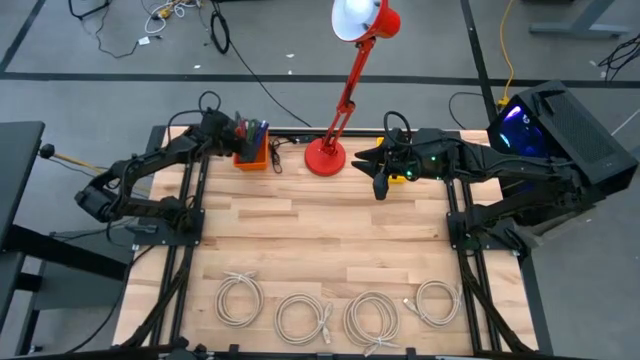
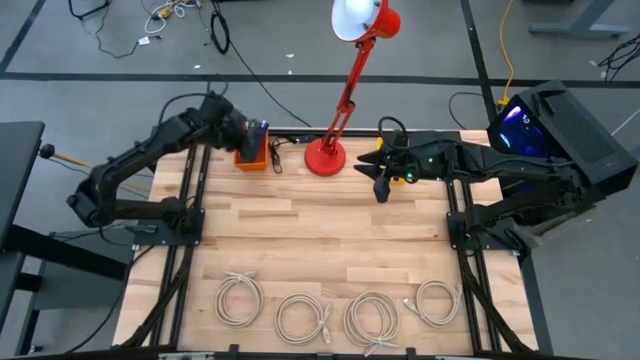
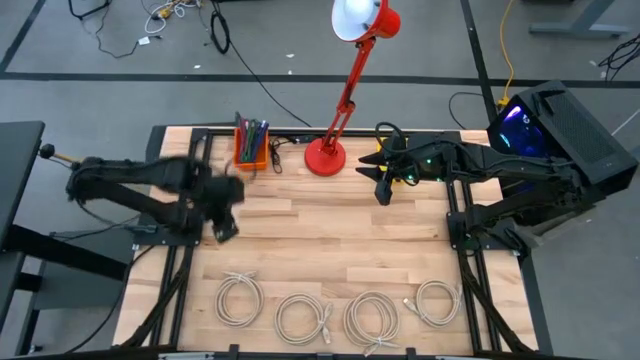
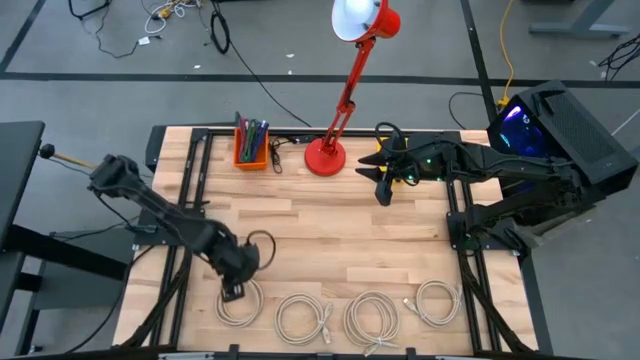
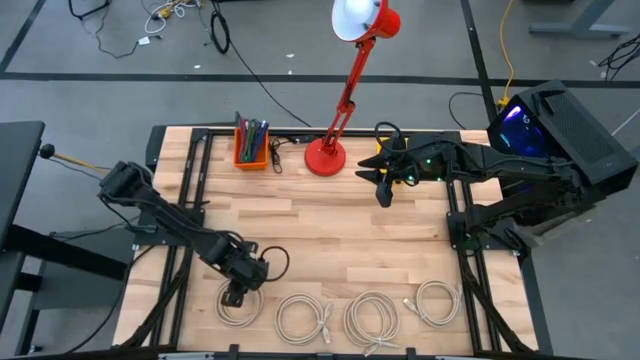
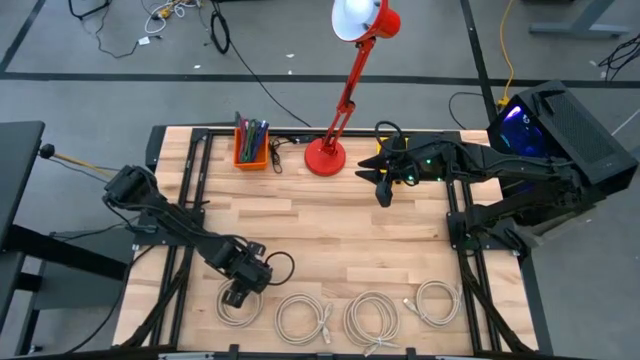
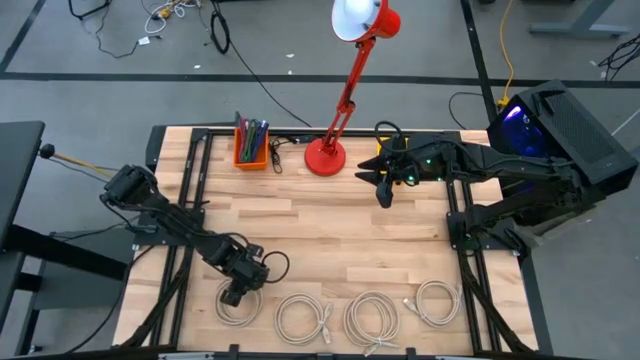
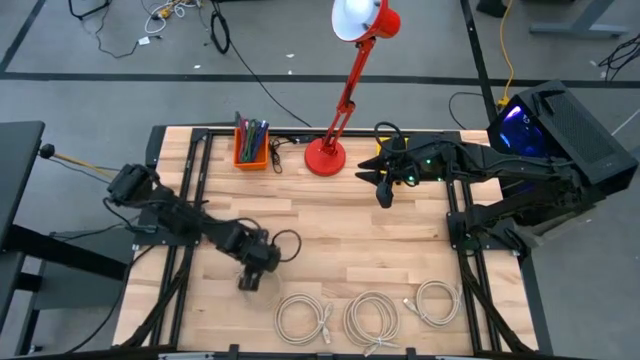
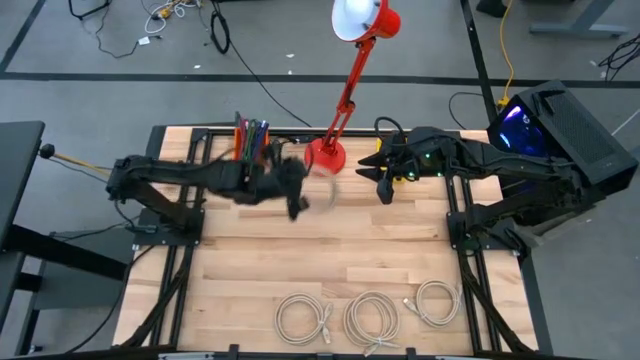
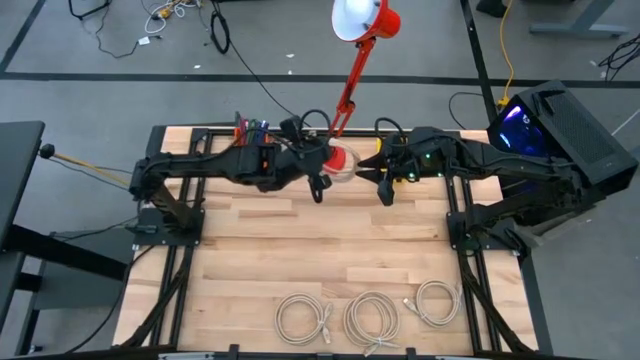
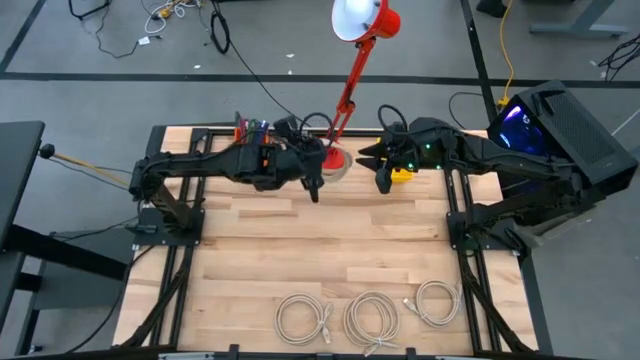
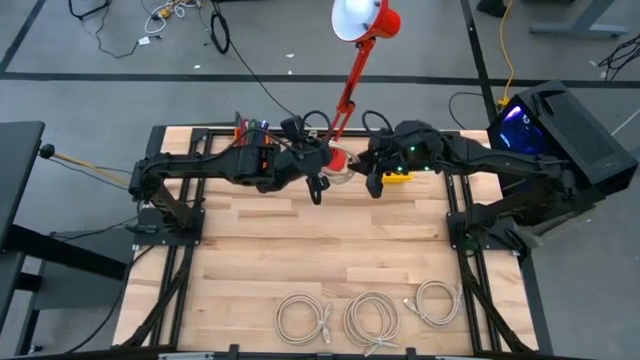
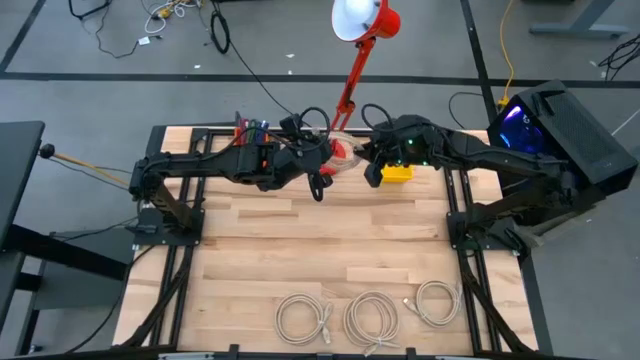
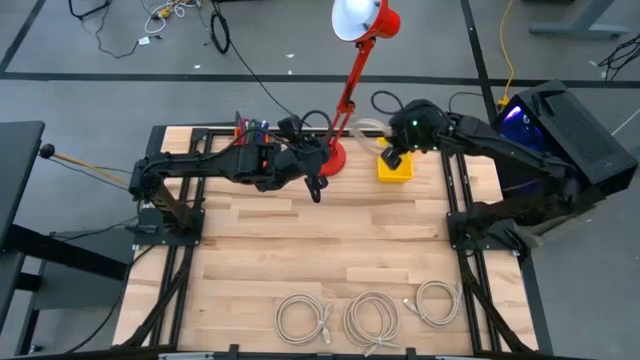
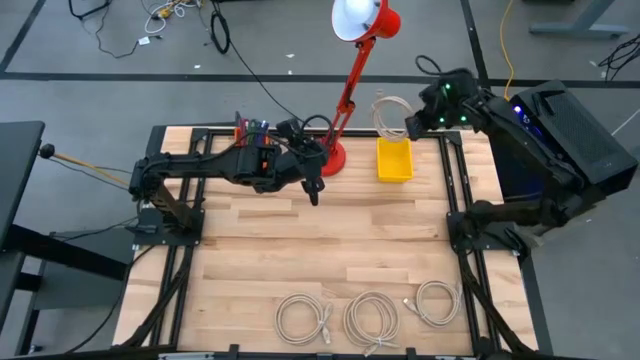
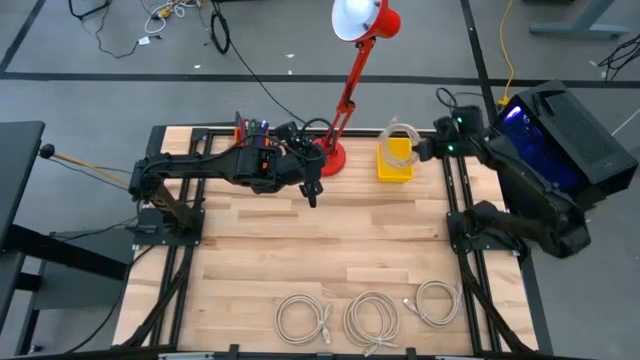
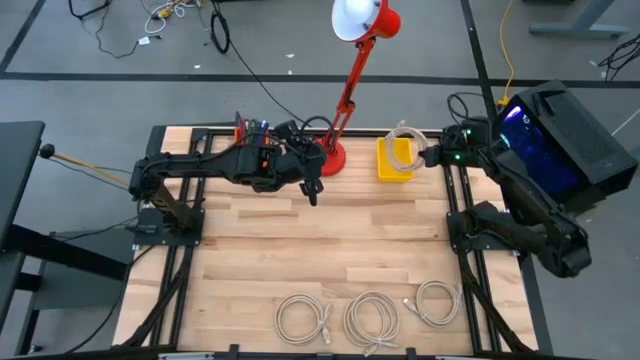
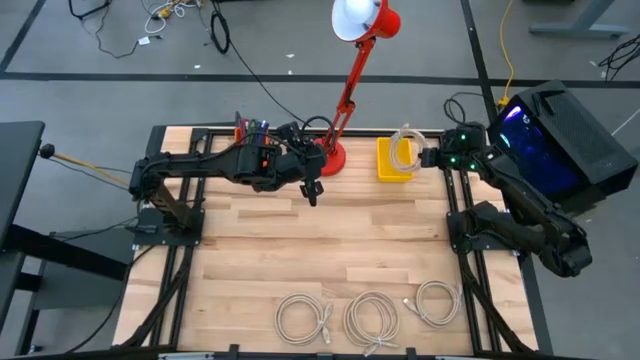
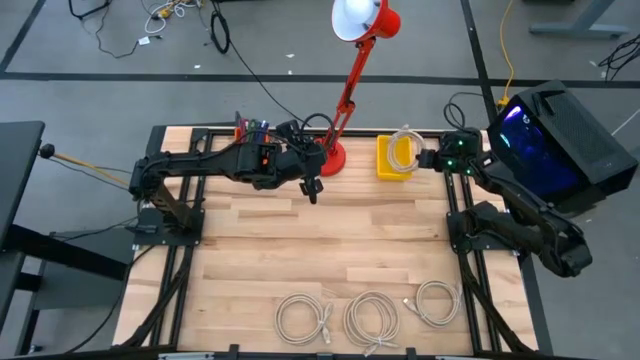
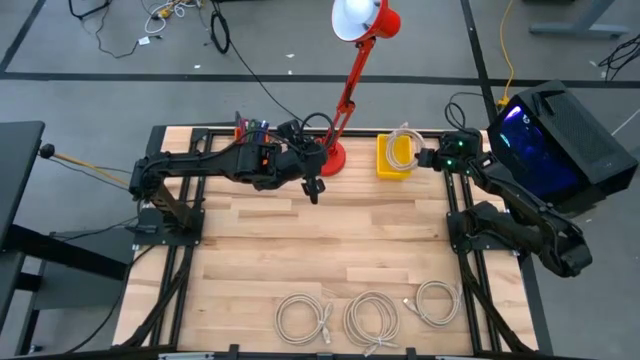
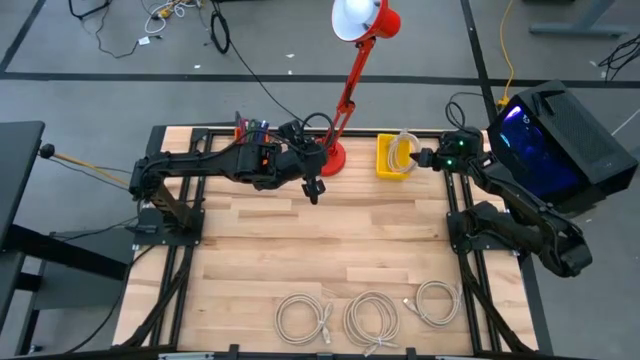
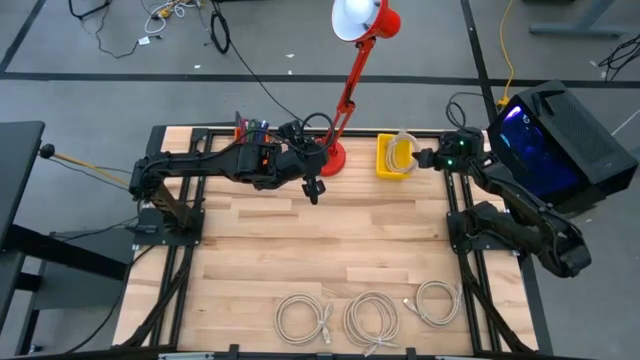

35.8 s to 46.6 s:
Task: Pick & Place USB Port
Put the white HDMI cable into the yellow bin

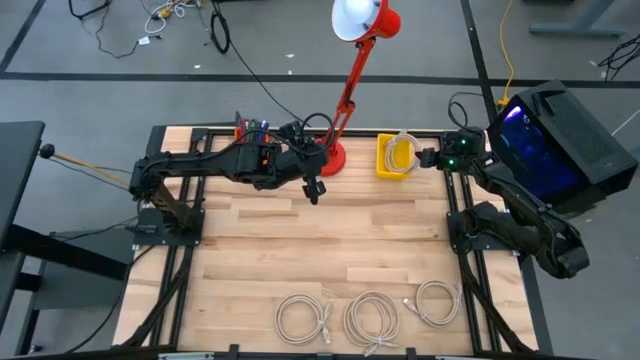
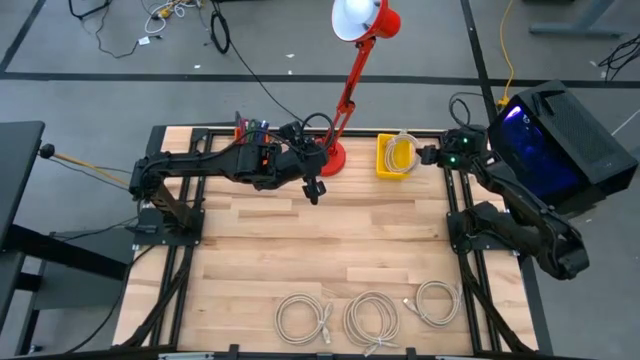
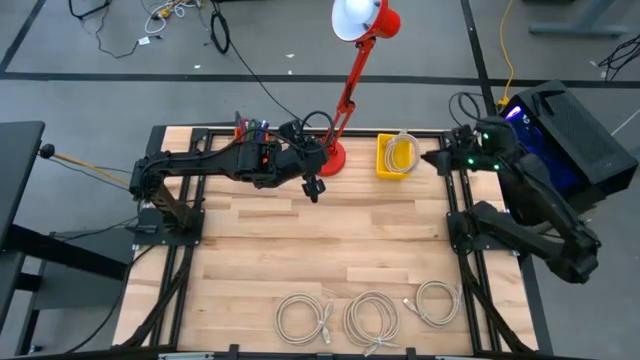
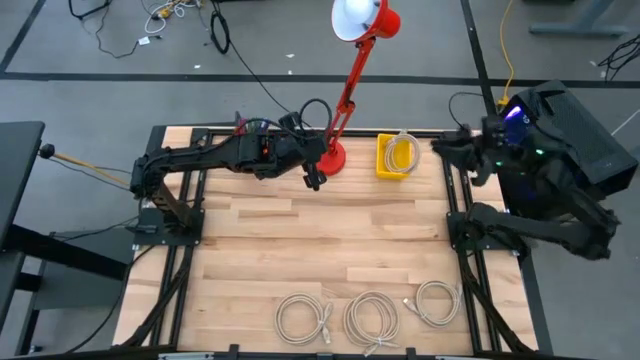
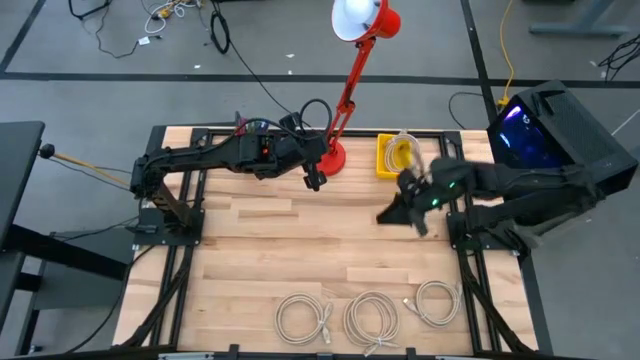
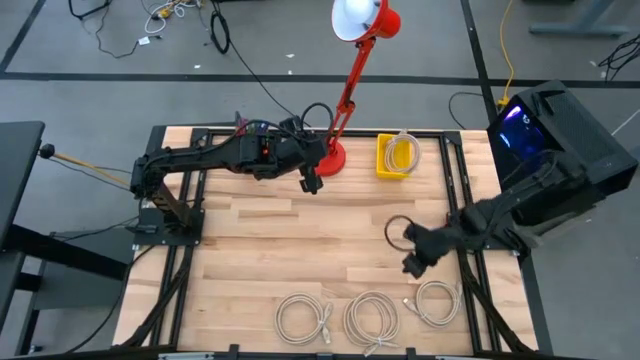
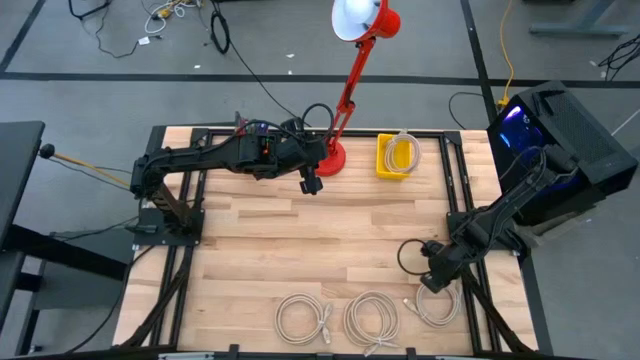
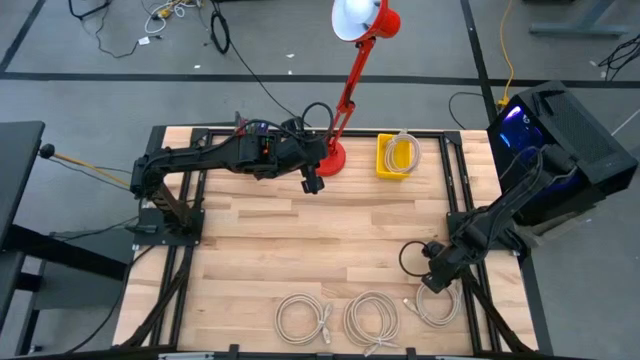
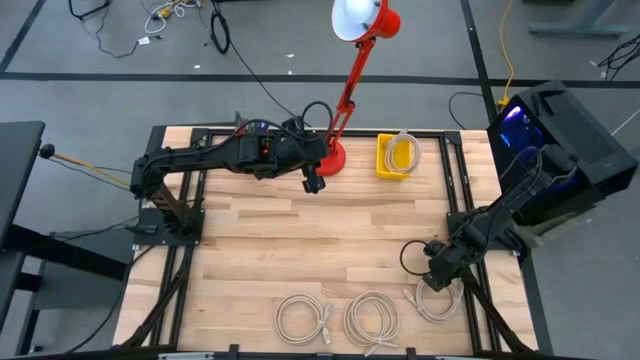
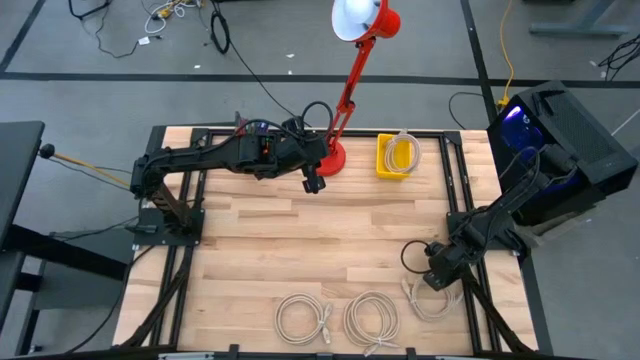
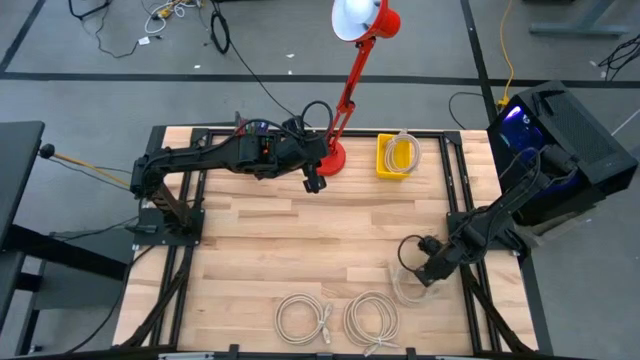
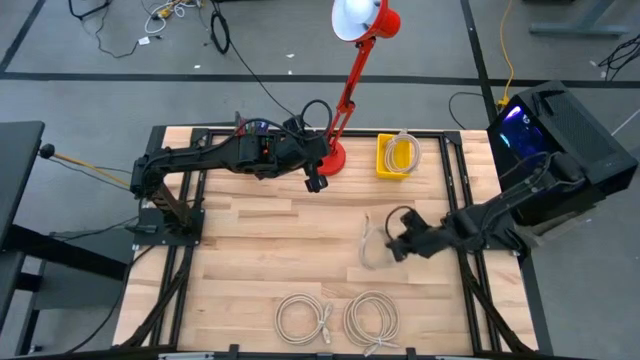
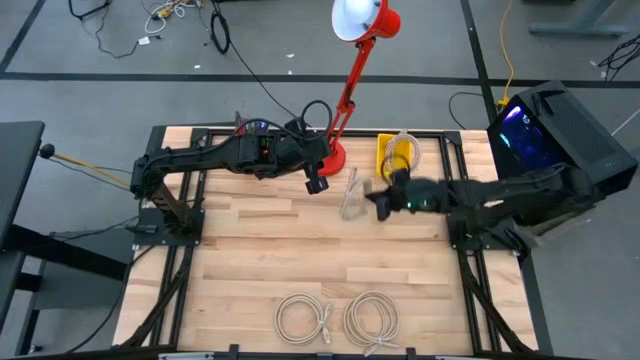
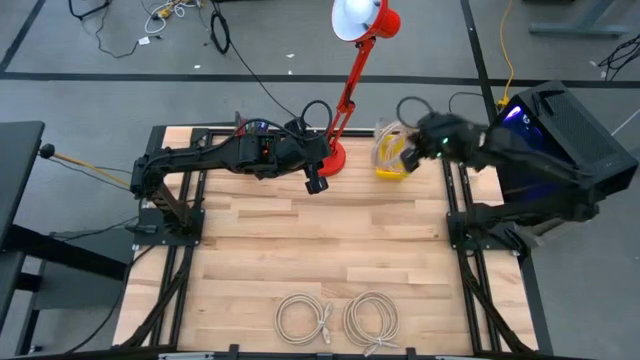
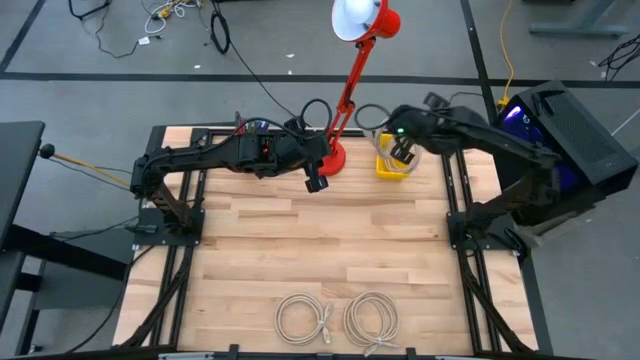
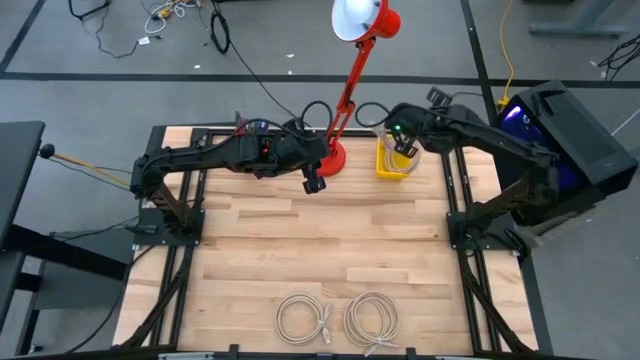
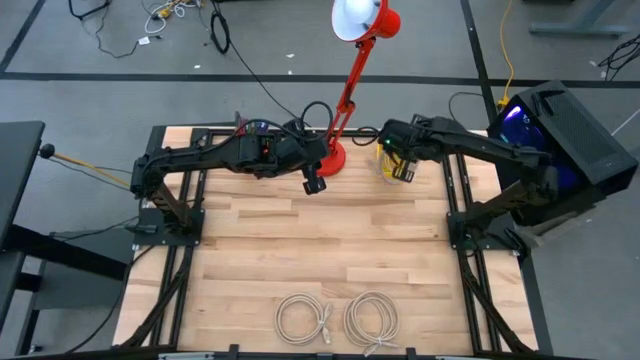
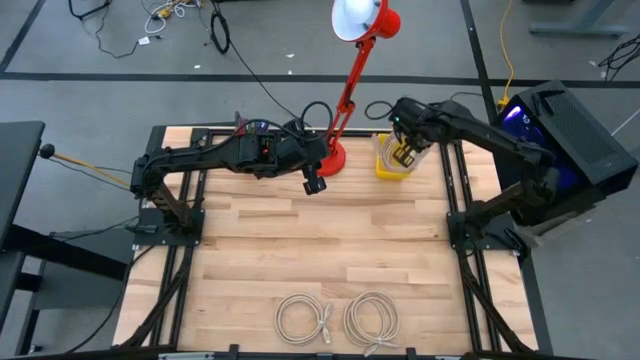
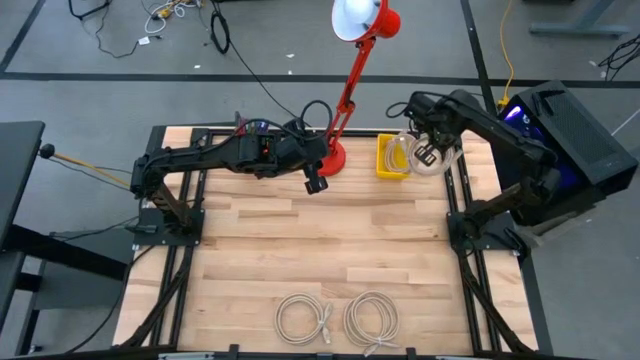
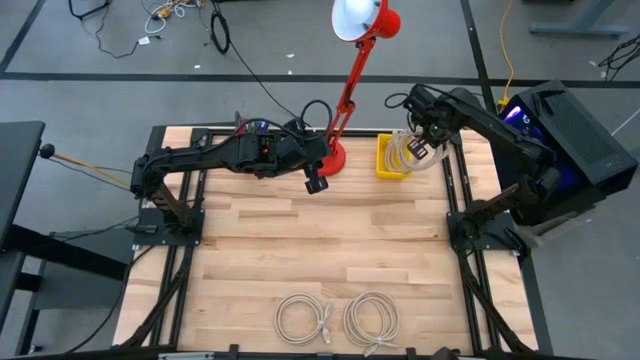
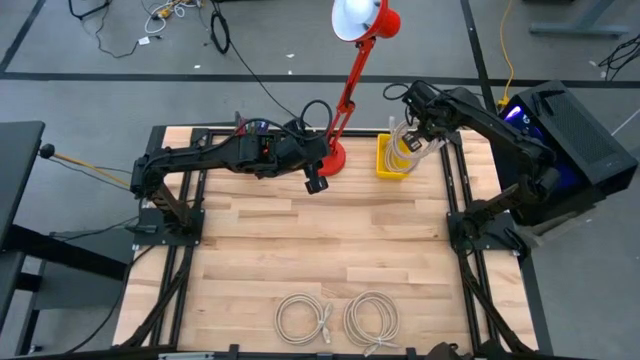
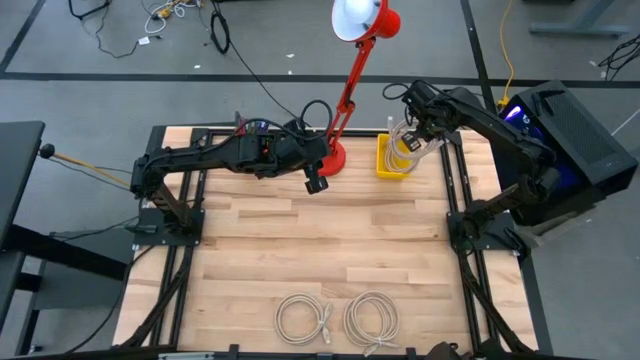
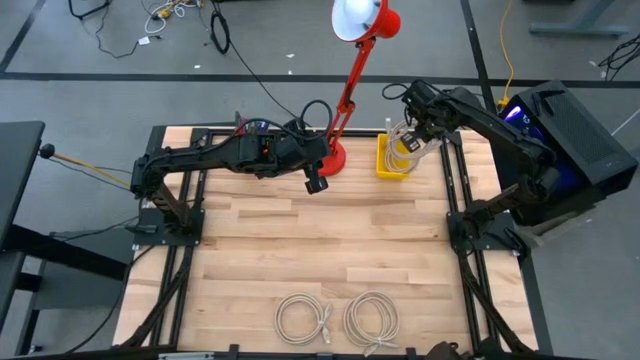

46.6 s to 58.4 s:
Put the white HDMI cable into the yellow bin

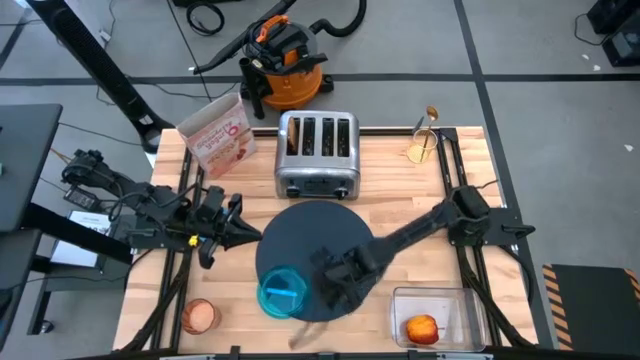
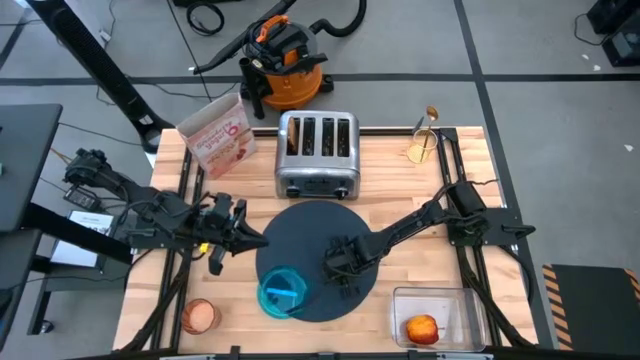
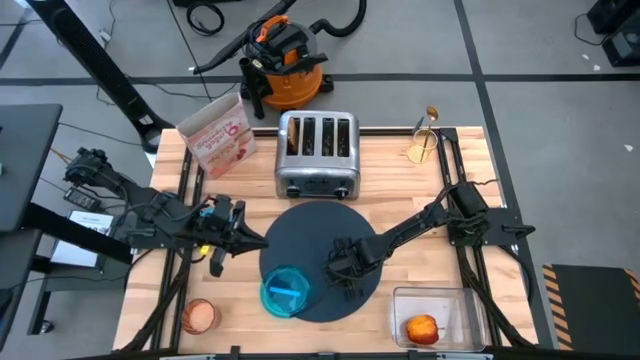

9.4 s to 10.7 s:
Task: Arrange a breakfast setting
Adjust the blue tablemat
